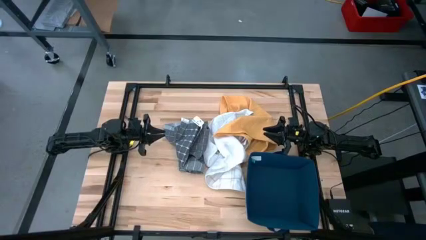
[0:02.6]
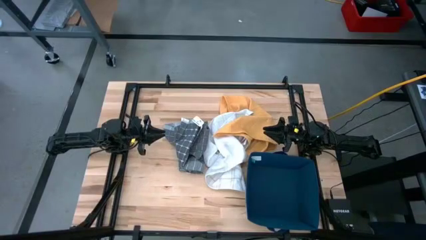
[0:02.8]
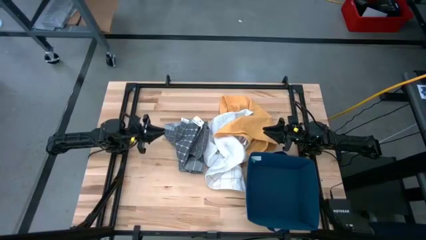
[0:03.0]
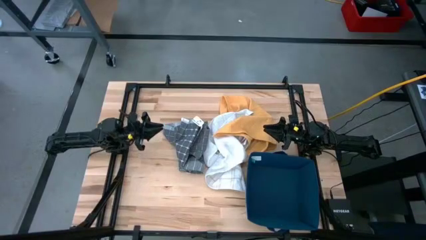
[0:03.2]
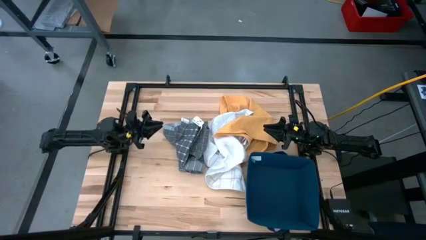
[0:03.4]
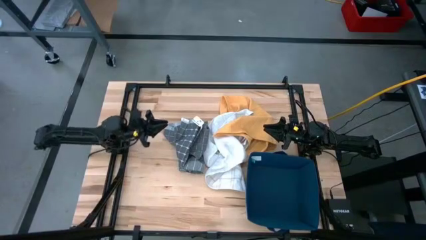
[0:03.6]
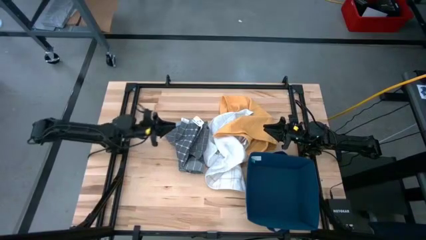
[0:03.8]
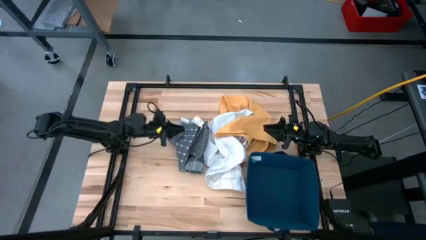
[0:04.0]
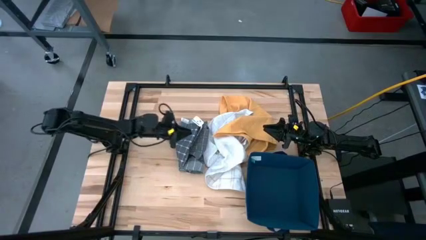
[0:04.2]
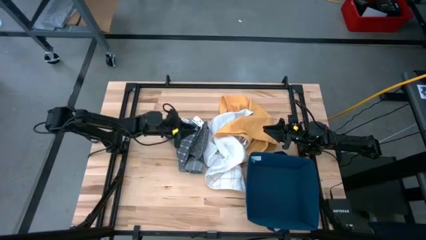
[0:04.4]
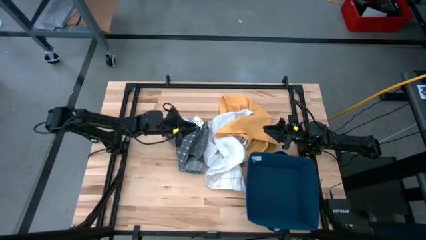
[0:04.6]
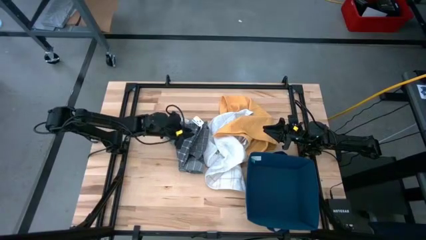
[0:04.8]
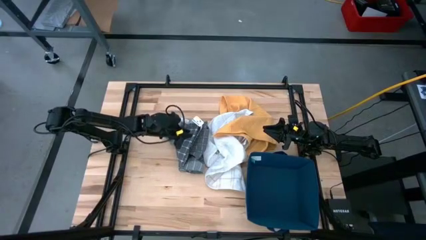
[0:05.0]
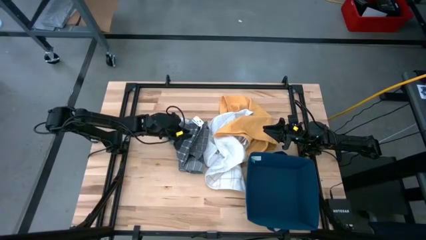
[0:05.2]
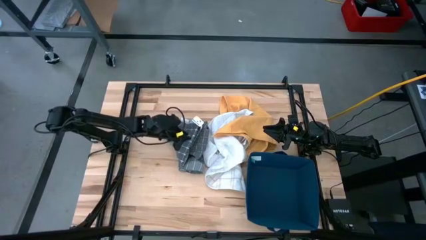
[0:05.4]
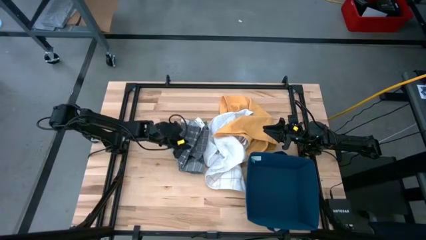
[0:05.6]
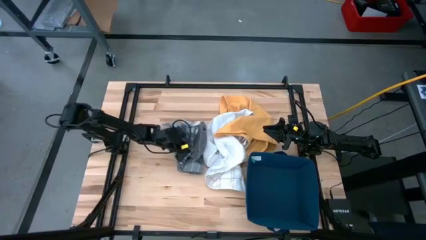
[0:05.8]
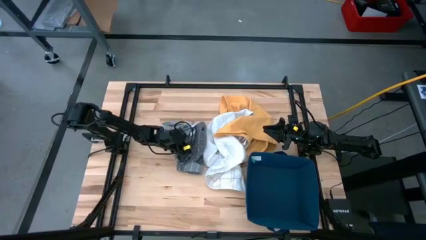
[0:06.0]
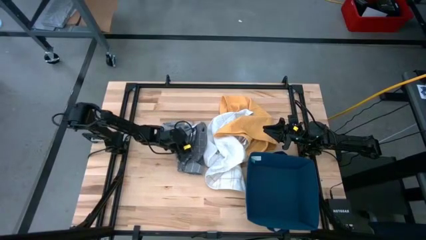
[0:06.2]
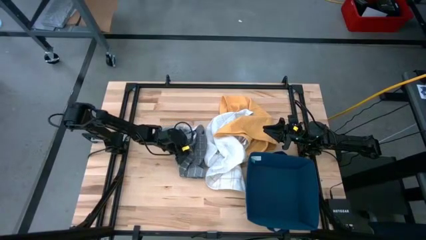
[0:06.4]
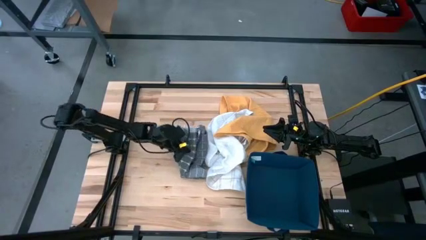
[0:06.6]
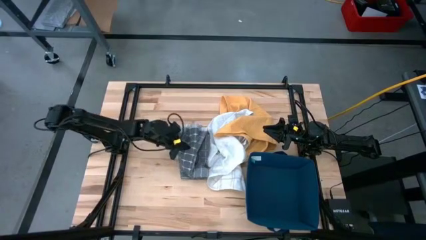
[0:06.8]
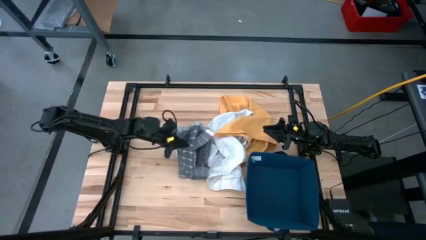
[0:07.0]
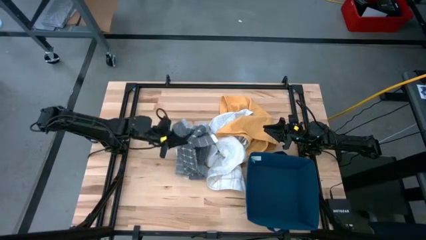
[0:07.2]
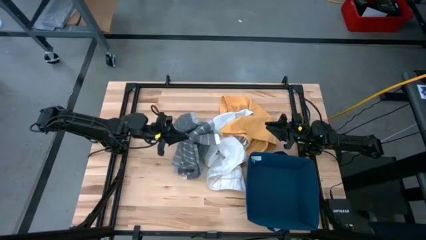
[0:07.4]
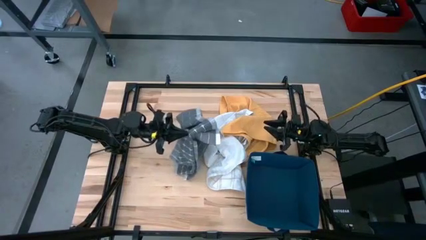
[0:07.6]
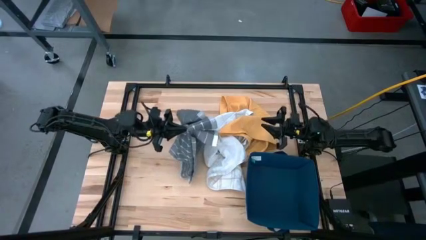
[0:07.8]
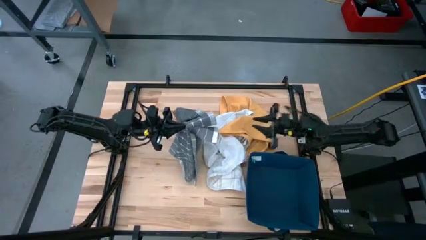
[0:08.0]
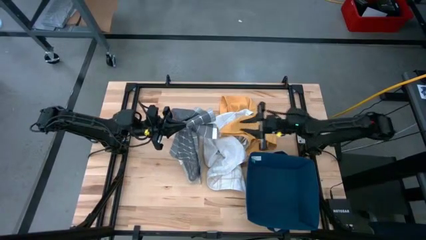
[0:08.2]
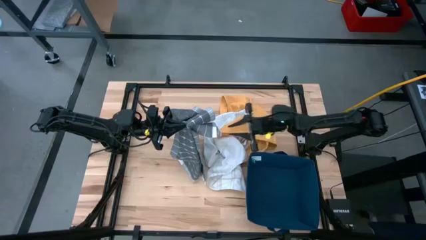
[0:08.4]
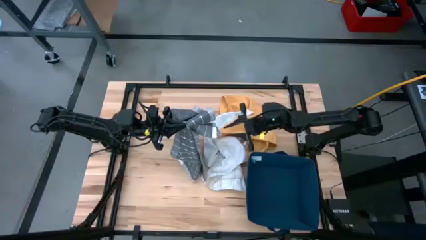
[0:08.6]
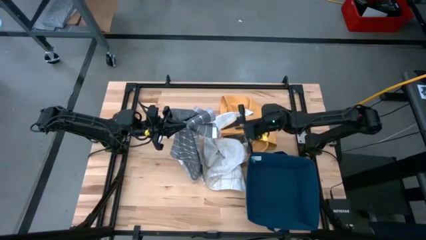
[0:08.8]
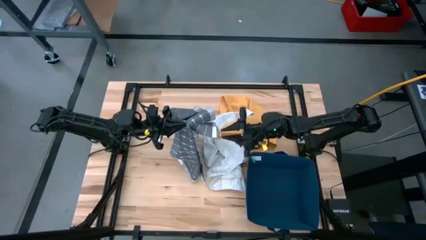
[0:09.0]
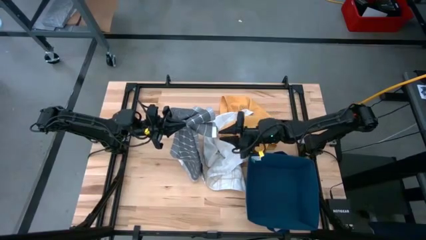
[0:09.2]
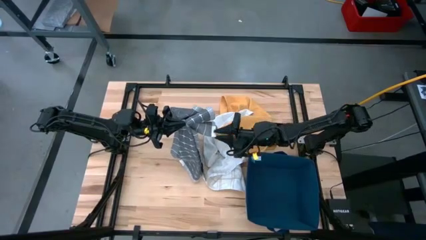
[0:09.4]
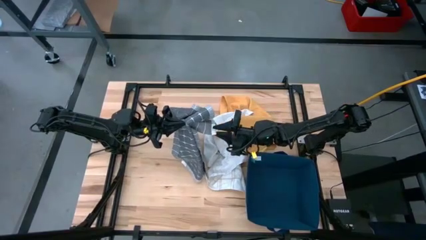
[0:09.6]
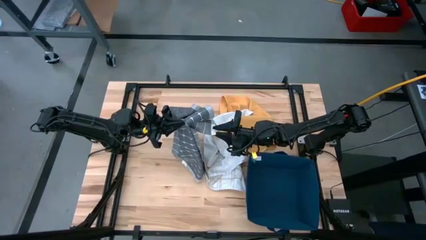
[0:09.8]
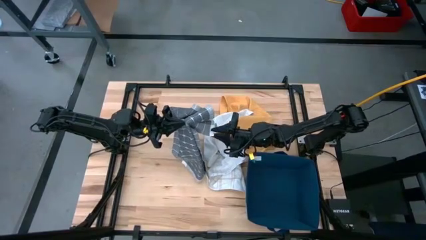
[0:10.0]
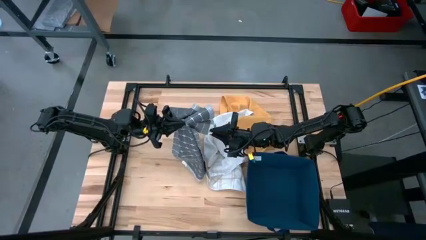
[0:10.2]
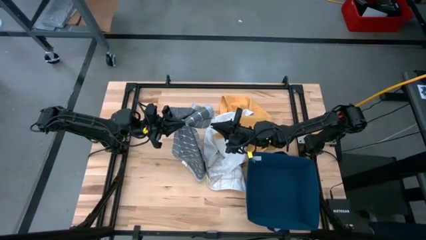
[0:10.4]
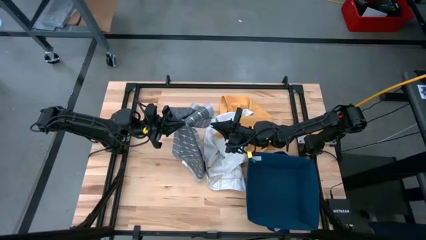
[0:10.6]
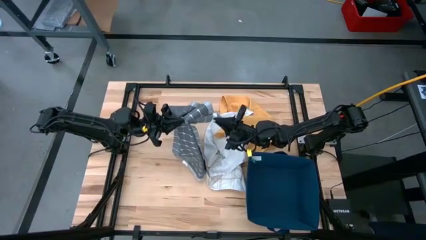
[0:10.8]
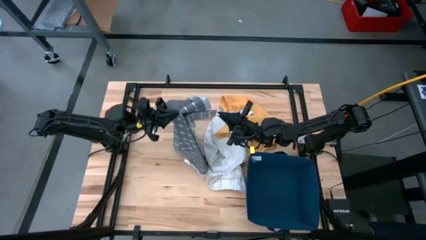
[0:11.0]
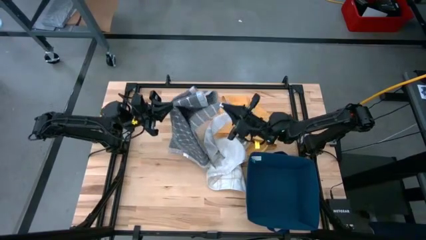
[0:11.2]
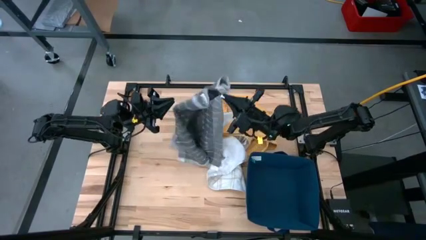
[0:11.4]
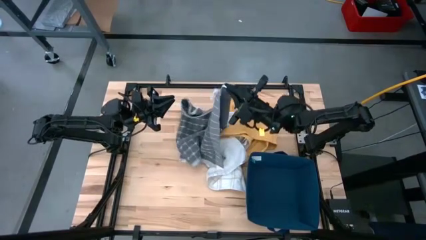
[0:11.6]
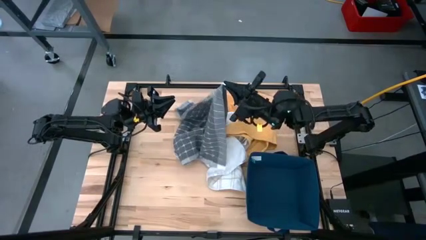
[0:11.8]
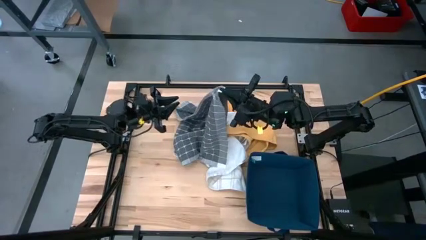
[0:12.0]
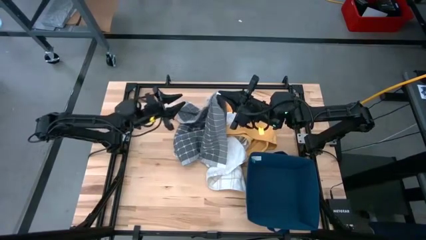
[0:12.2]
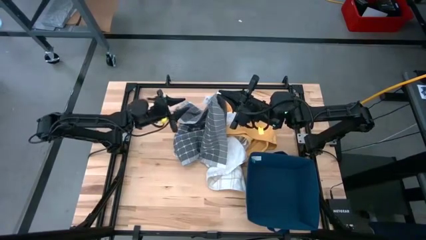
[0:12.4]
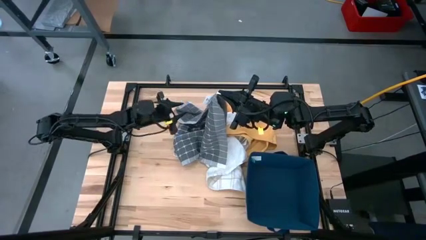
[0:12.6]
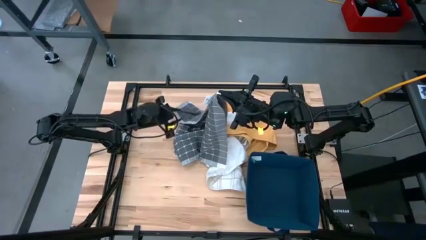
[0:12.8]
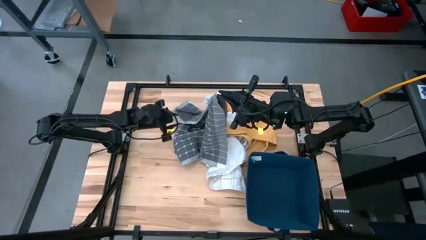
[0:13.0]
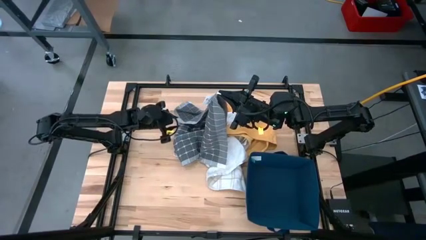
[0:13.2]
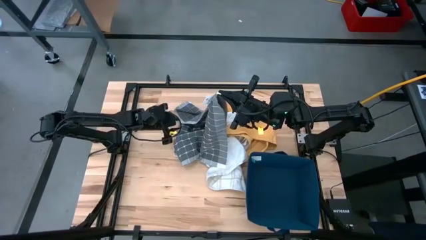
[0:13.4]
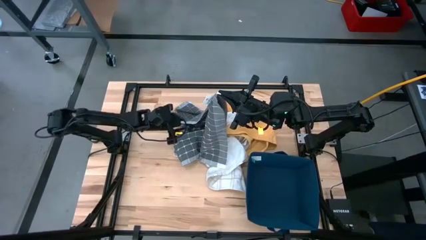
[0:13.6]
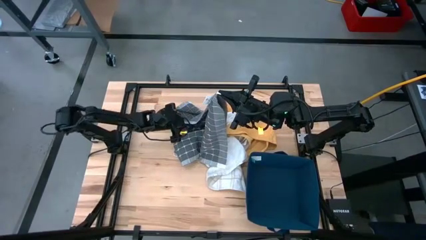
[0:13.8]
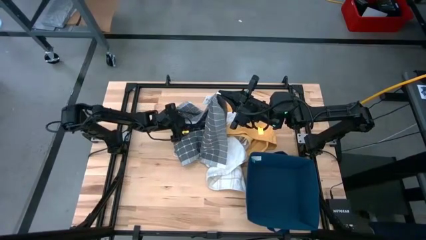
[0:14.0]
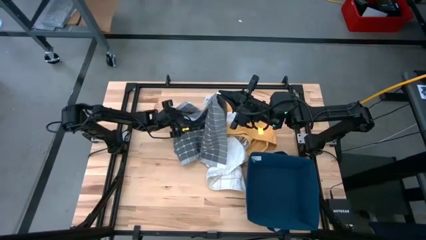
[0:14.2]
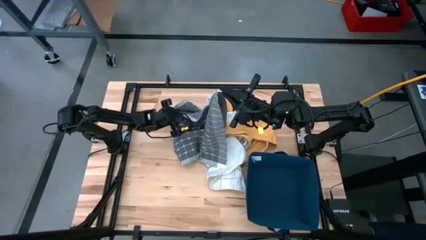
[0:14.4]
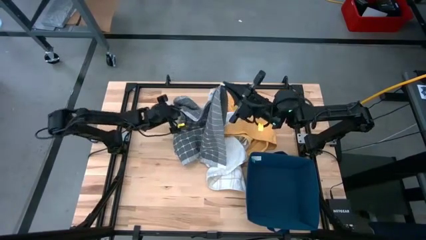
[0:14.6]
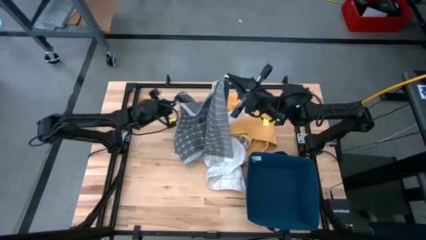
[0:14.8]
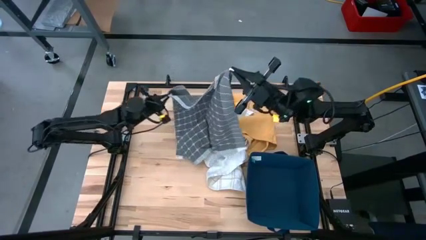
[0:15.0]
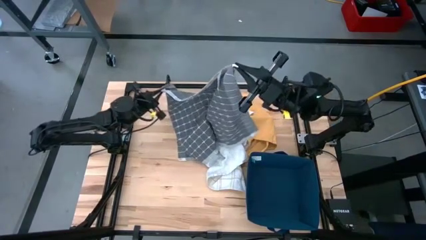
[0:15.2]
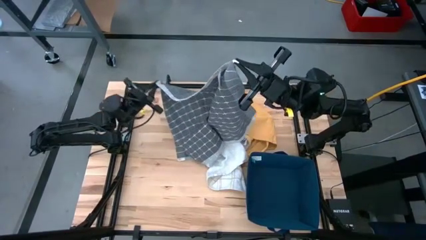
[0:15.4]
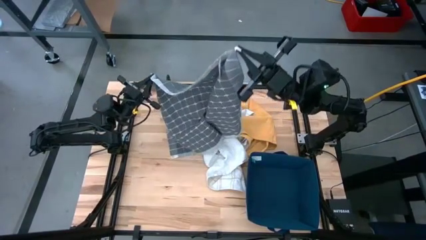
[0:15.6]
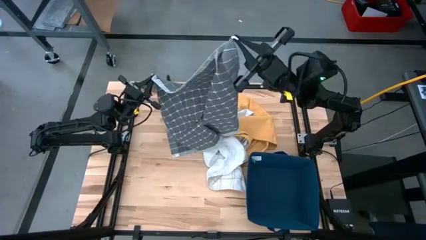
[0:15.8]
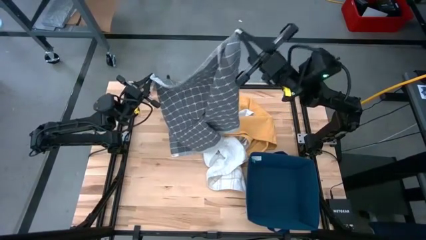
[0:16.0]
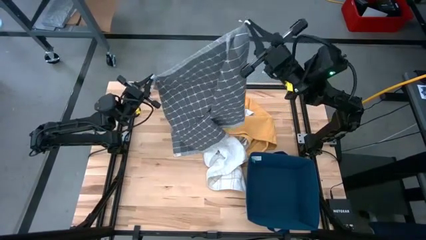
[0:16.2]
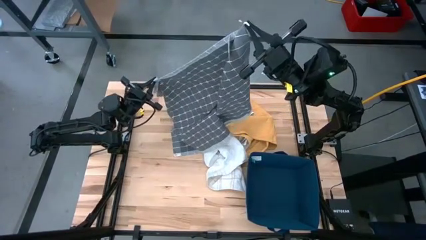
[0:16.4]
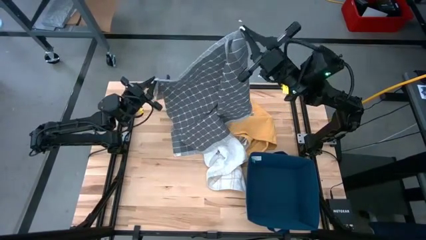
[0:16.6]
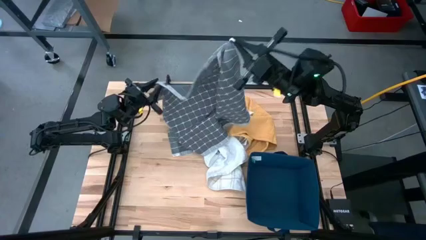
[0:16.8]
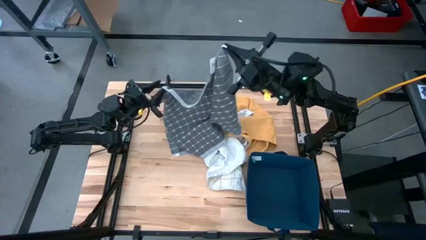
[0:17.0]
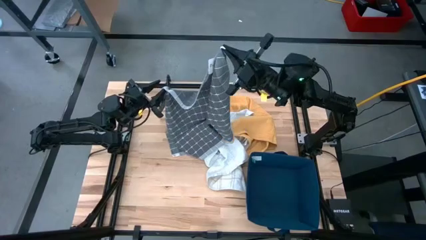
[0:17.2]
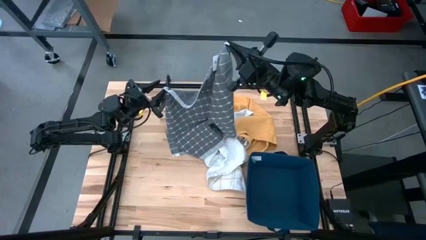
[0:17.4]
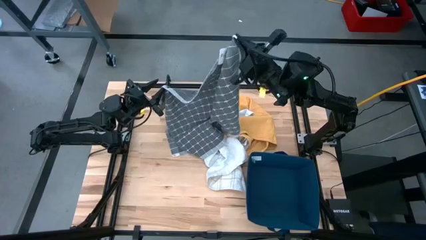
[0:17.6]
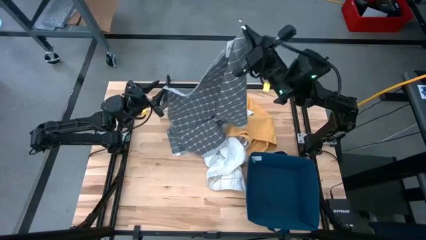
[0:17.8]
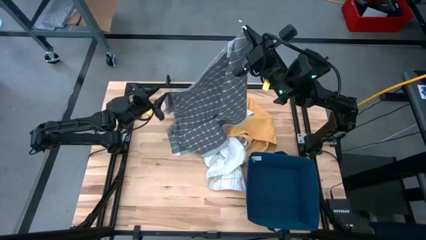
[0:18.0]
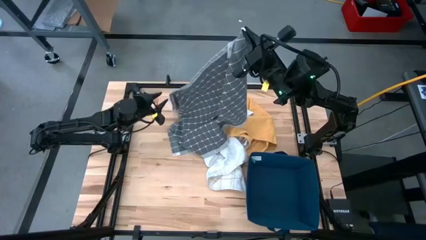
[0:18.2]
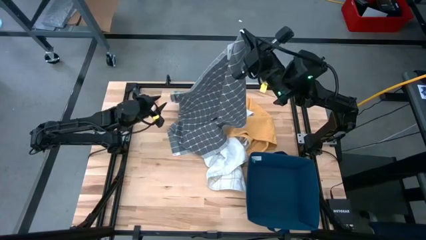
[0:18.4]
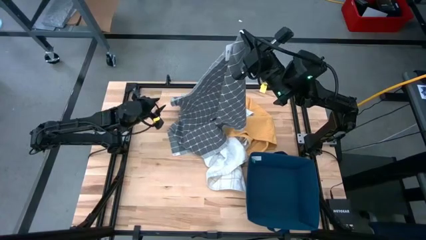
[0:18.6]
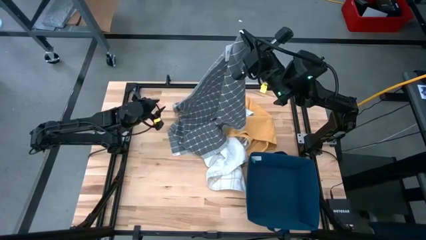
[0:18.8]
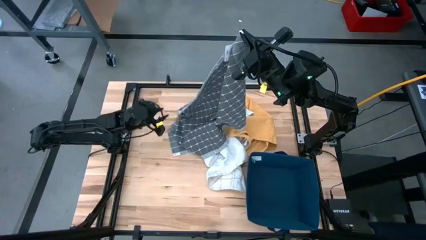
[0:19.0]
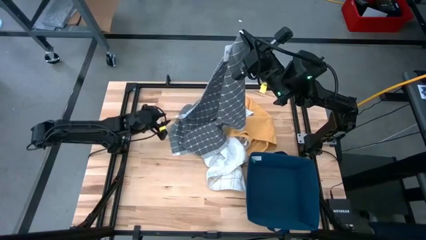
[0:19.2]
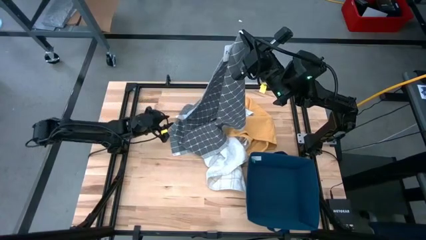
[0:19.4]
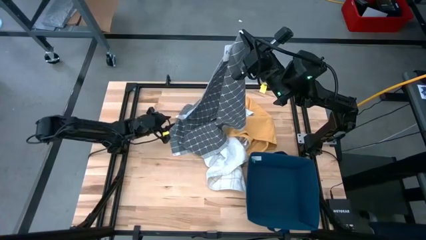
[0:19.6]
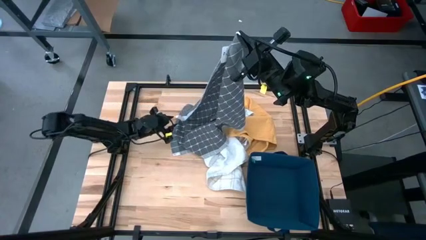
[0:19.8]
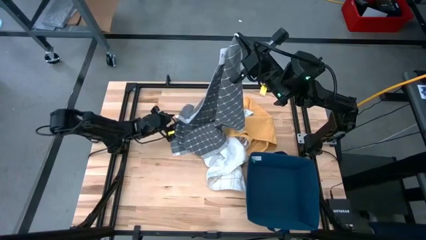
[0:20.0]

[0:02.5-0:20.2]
Task: Fold towel
Fold the gray towel
